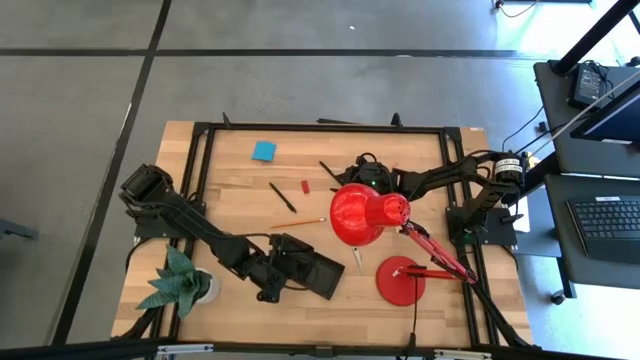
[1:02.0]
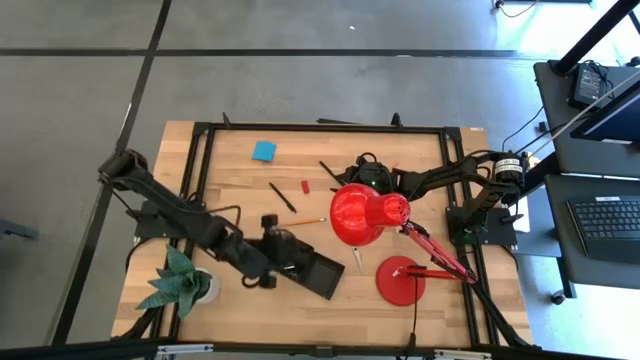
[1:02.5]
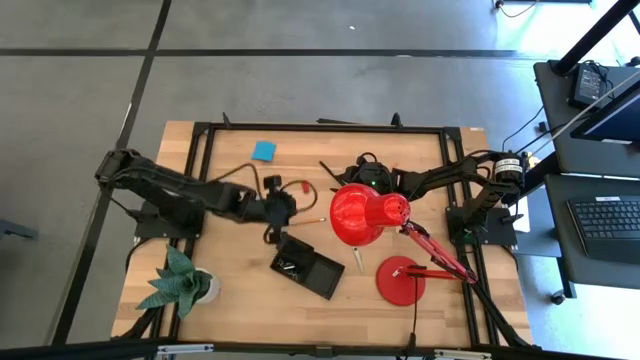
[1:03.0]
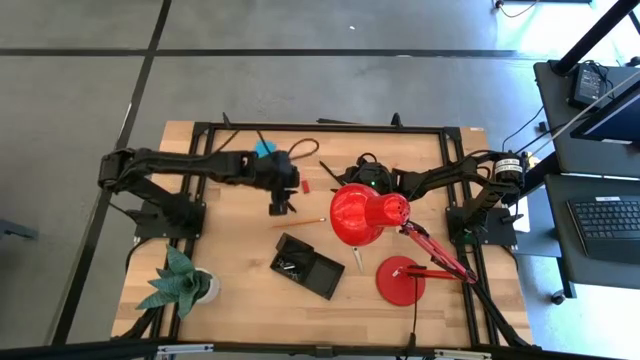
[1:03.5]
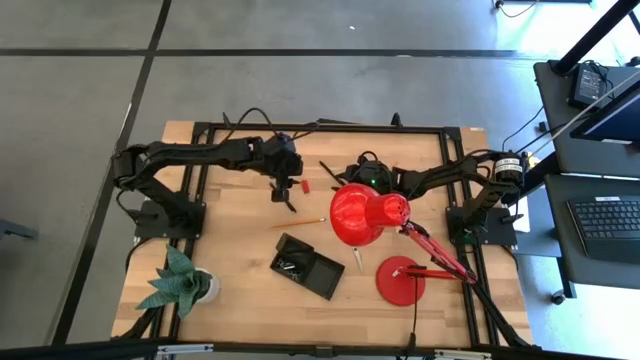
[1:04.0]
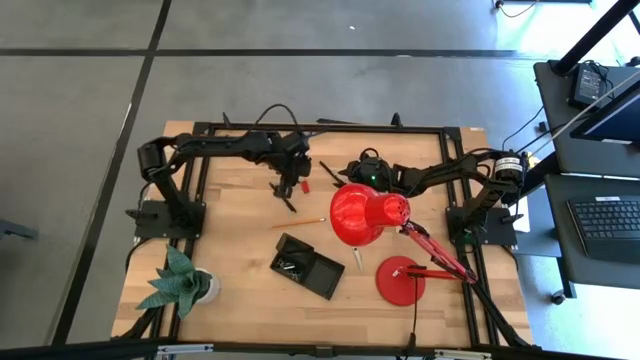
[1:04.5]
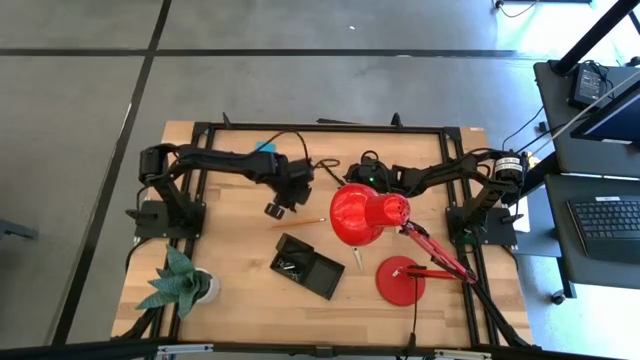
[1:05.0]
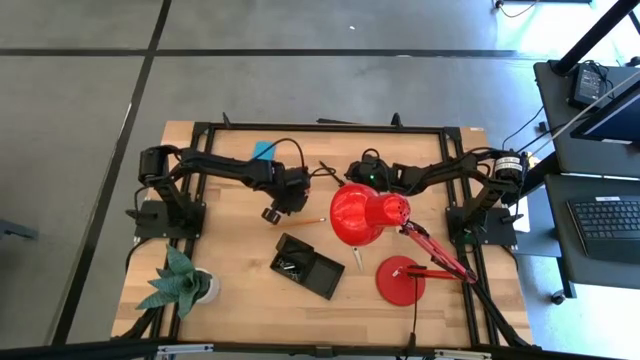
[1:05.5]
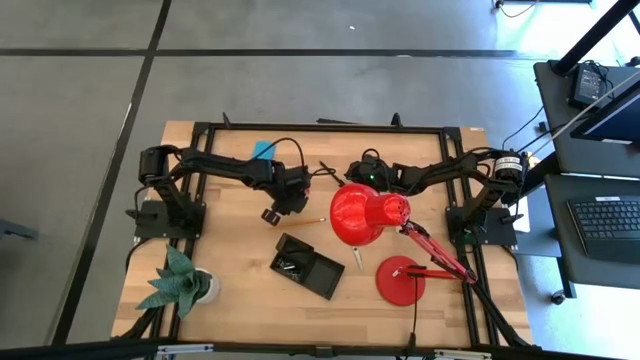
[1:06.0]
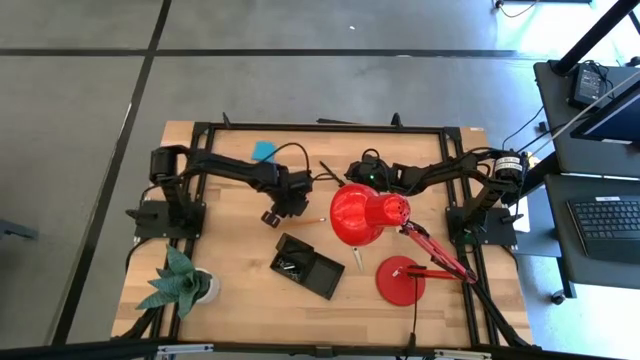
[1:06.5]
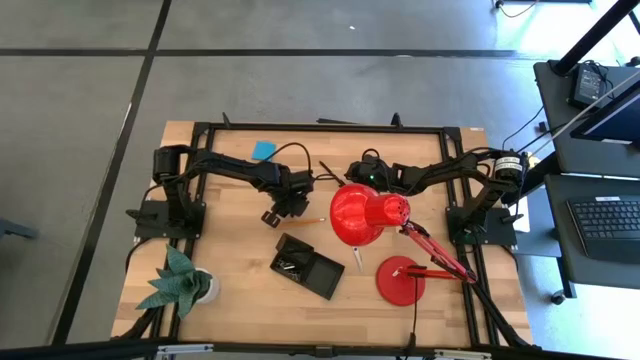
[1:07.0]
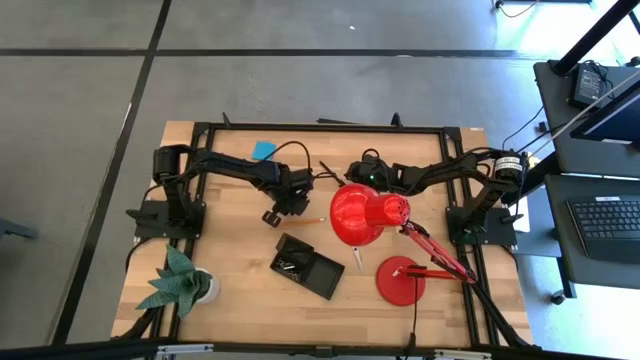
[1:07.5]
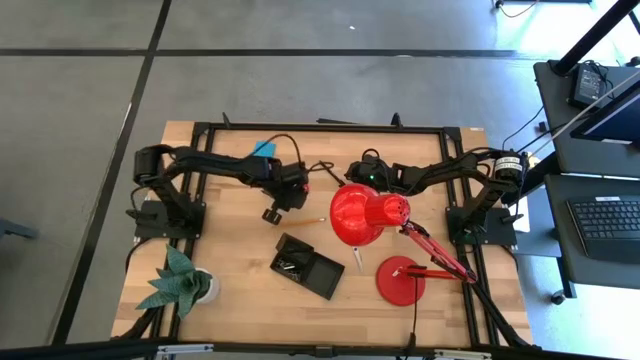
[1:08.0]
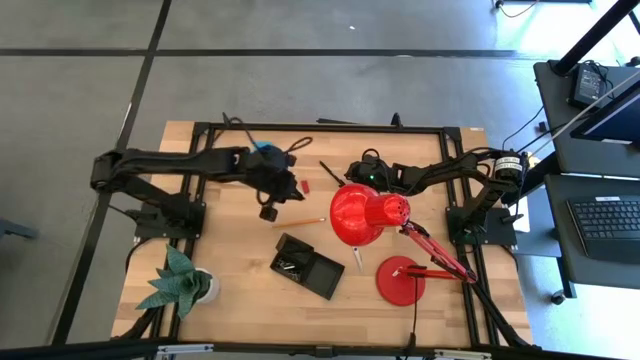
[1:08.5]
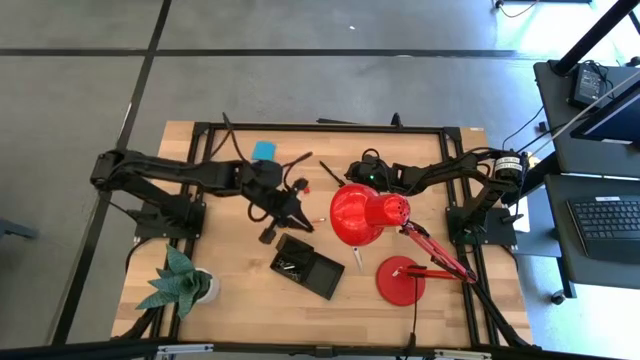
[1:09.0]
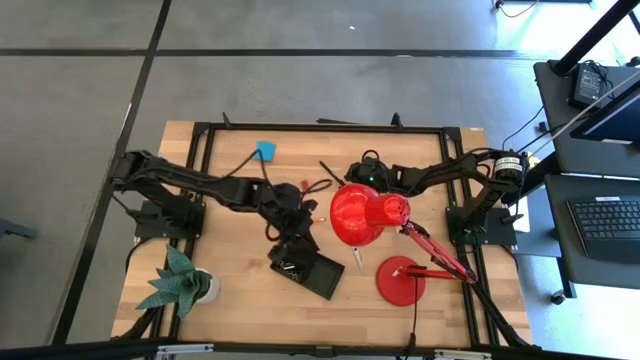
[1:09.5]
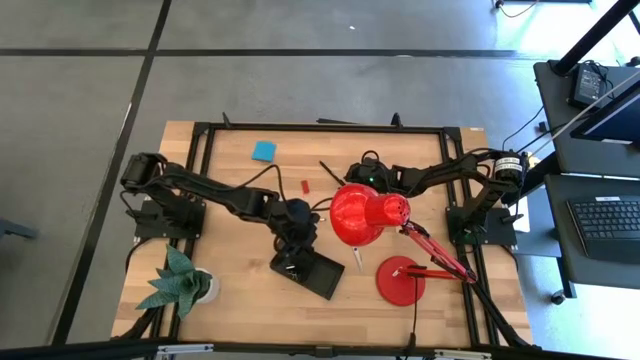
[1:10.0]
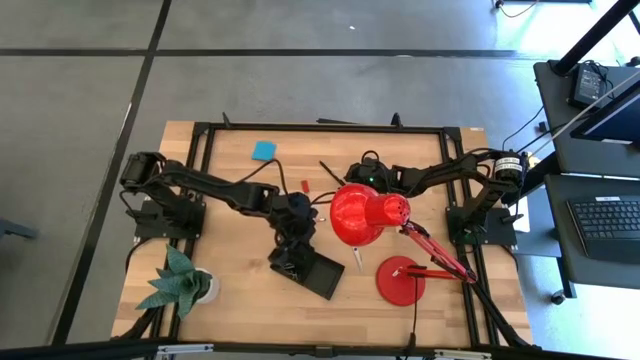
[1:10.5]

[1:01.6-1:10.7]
Task: Pick and place office supplies into organizer
Put the left black pen into the desk organizer

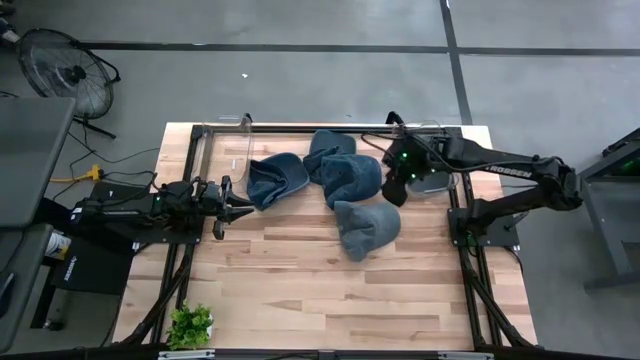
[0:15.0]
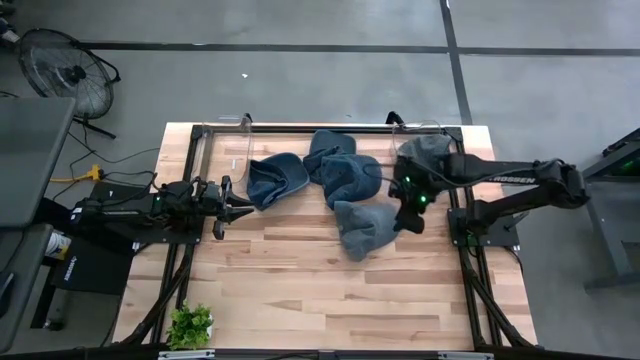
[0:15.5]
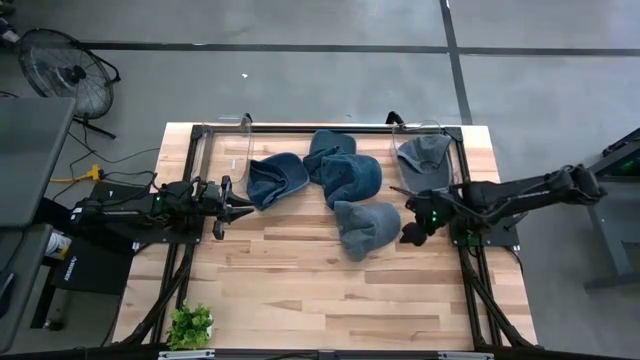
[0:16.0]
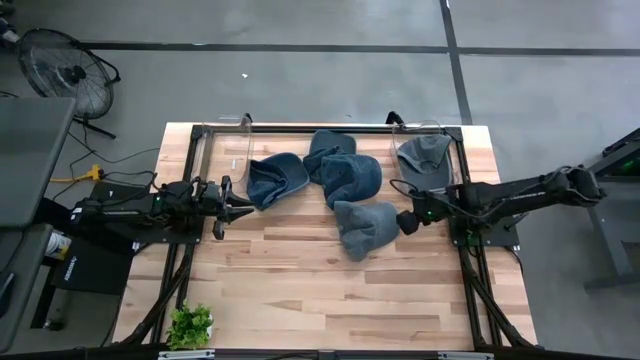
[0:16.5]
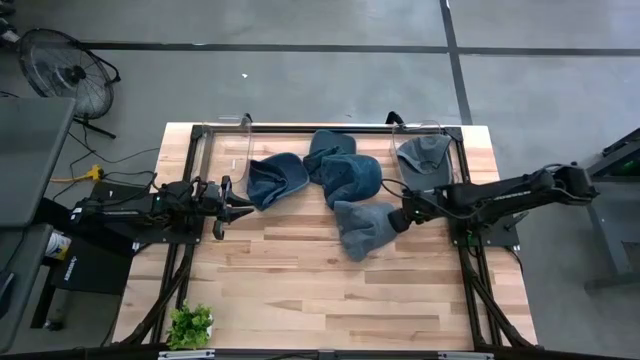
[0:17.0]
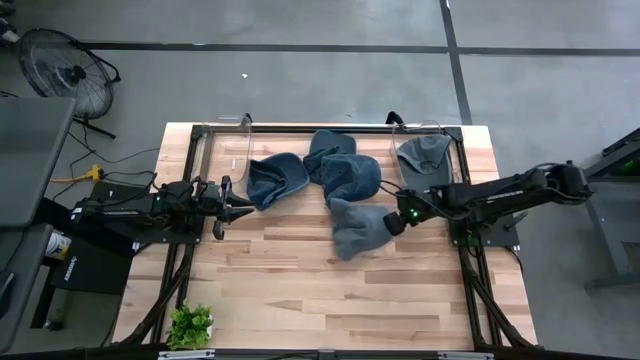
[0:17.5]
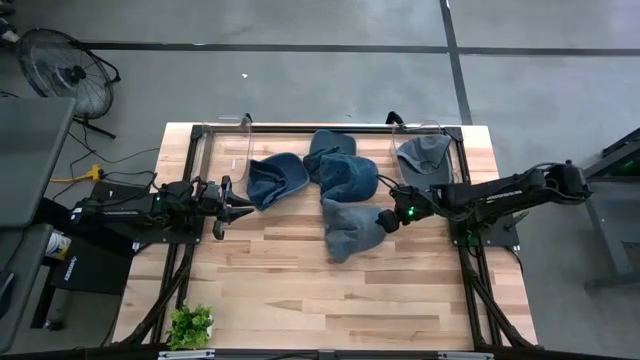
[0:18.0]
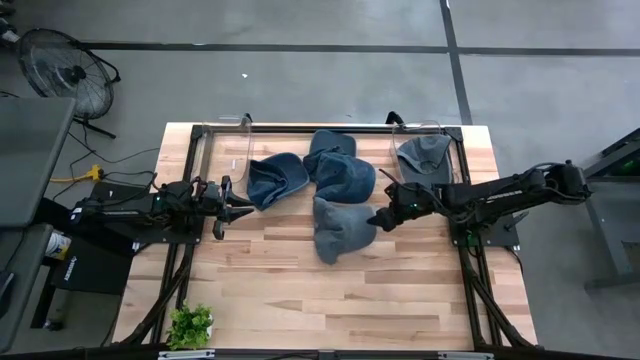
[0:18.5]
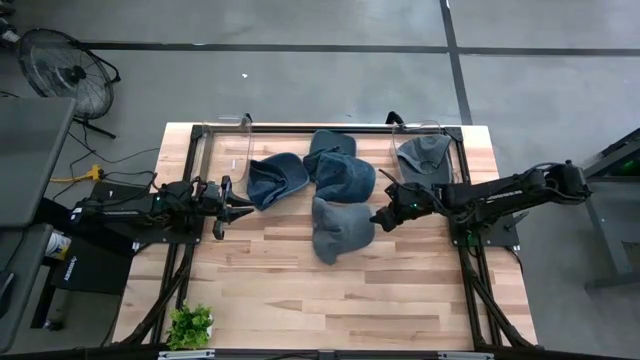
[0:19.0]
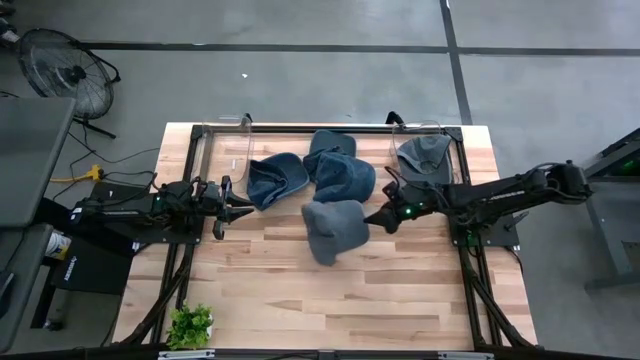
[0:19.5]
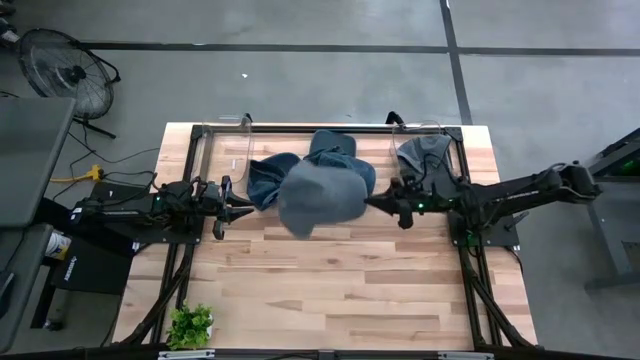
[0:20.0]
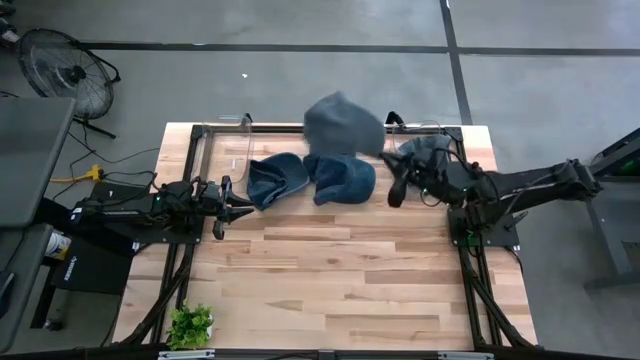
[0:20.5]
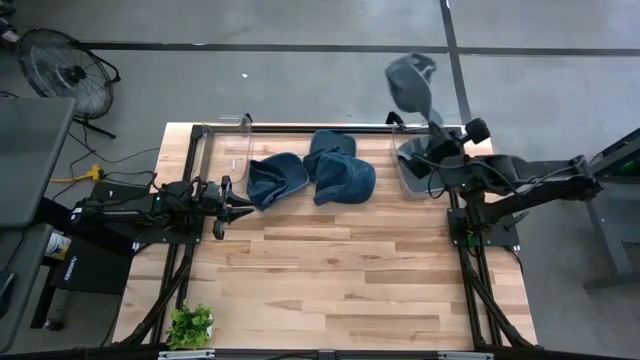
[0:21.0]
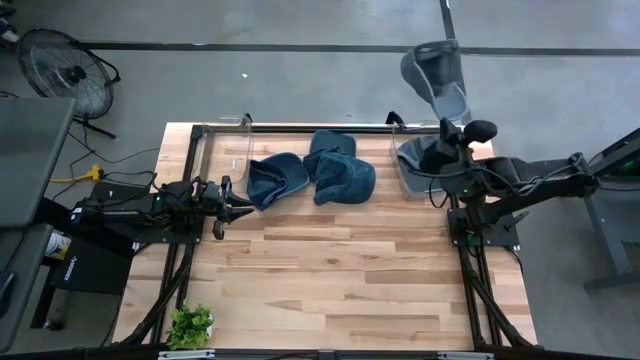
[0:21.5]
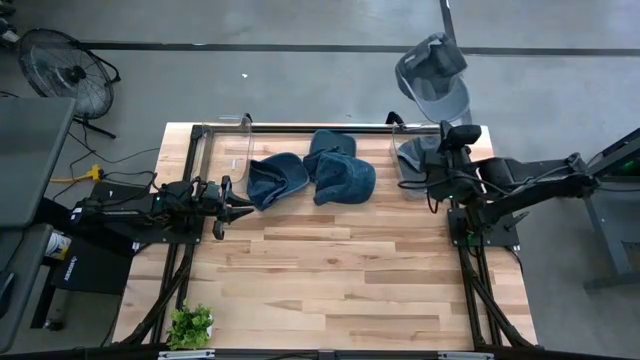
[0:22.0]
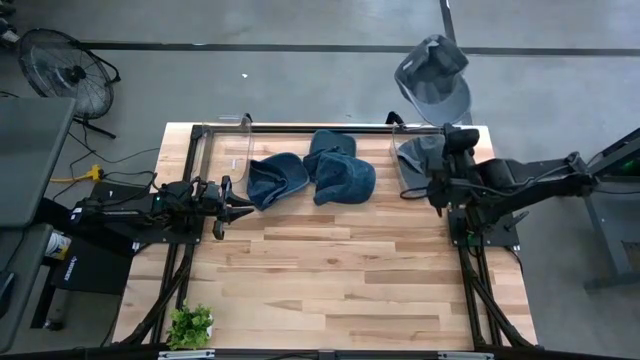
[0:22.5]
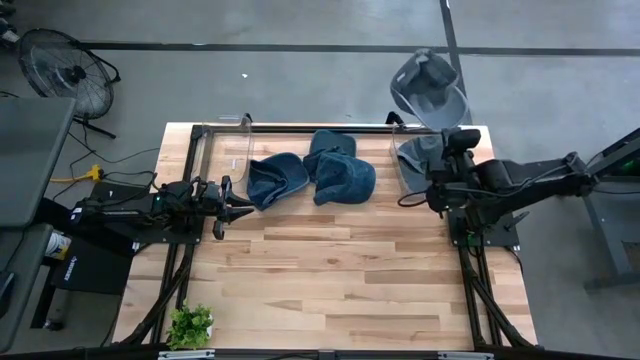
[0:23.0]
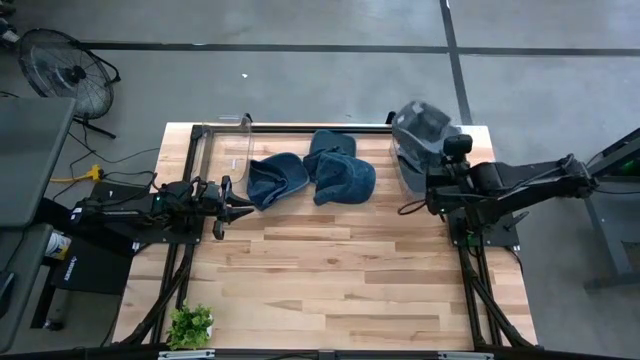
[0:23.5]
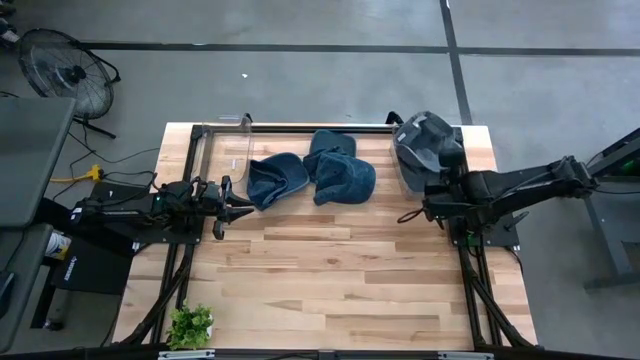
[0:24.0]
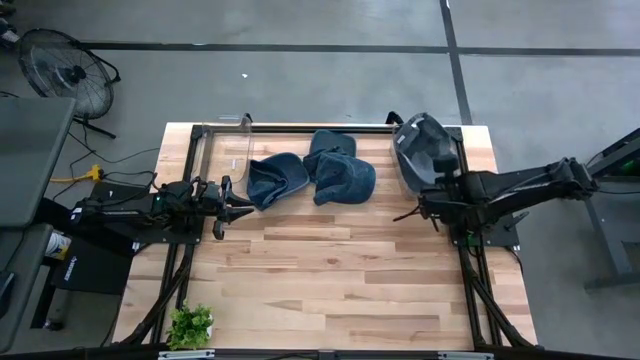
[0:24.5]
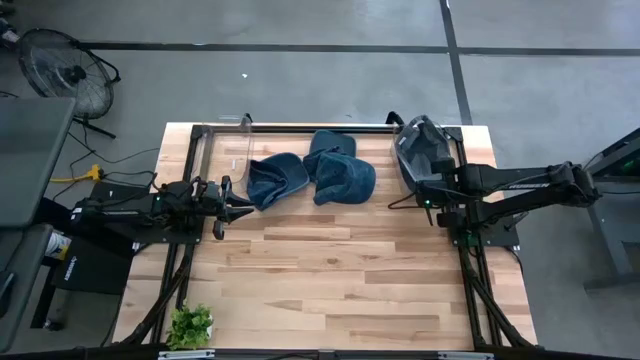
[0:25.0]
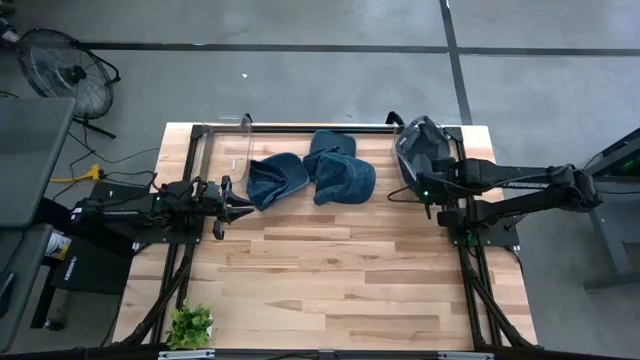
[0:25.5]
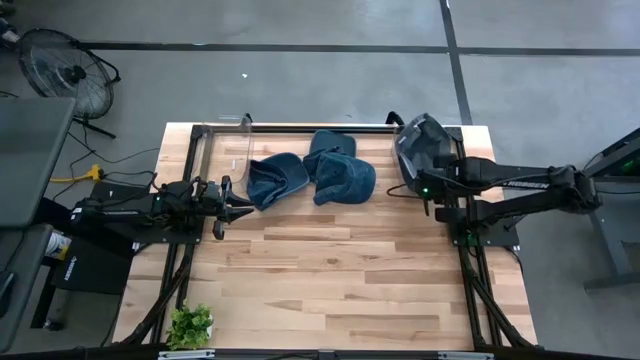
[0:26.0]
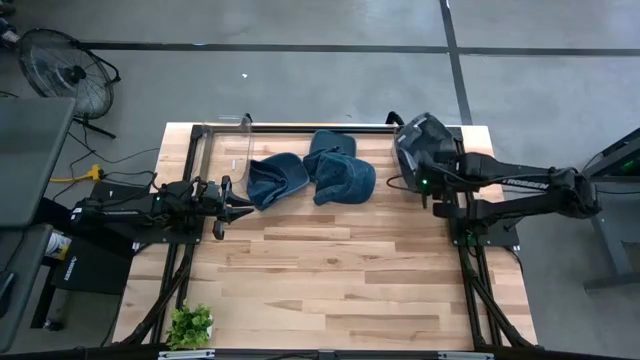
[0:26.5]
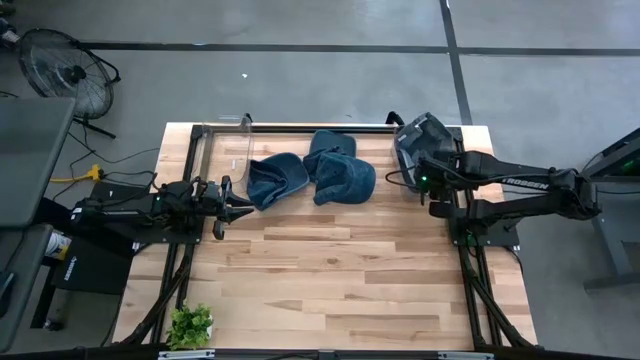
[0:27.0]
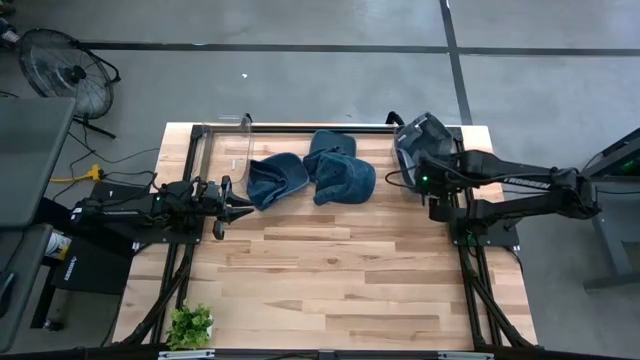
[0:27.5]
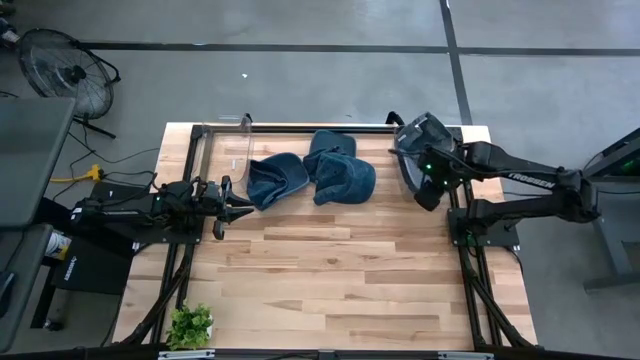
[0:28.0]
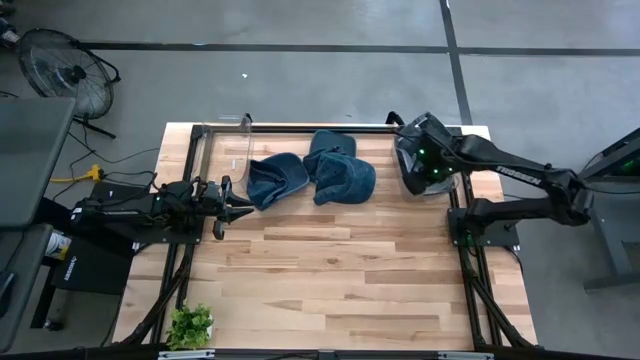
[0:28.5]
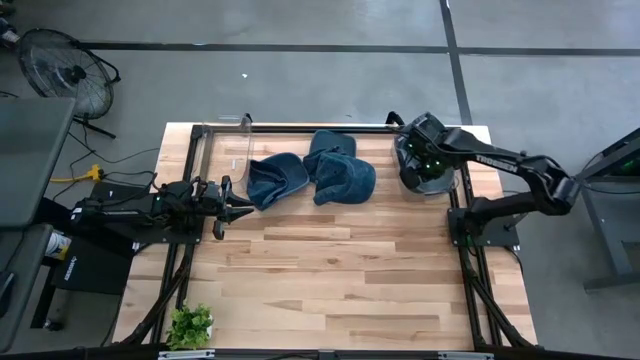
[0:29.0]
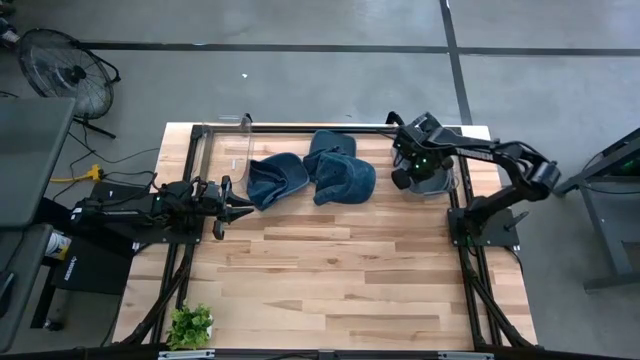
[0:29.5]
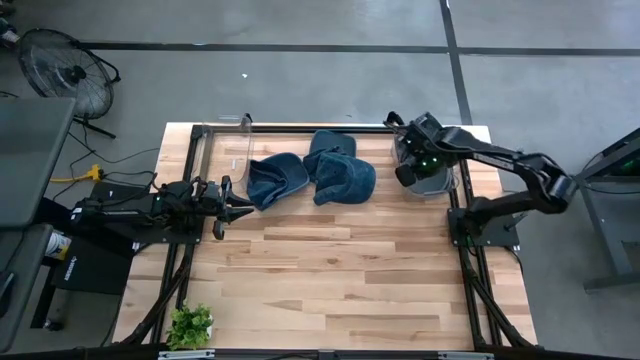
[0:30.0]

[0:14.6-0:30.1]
Task: Pick & Place hat
Put the gray cap into the right transparent bin
